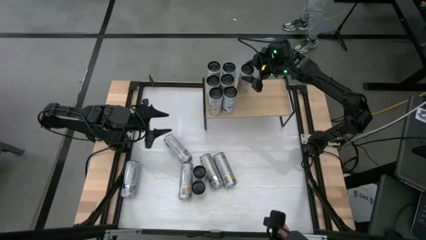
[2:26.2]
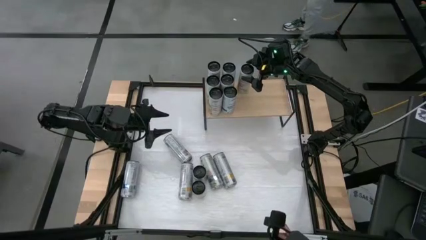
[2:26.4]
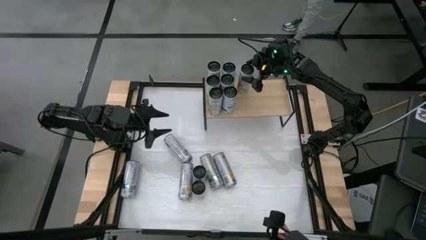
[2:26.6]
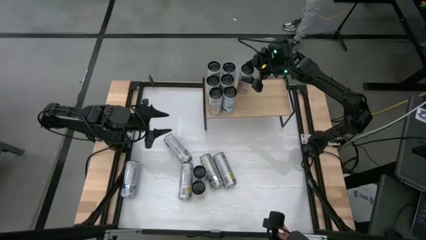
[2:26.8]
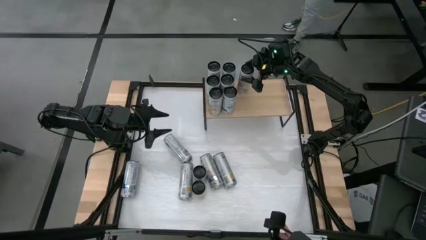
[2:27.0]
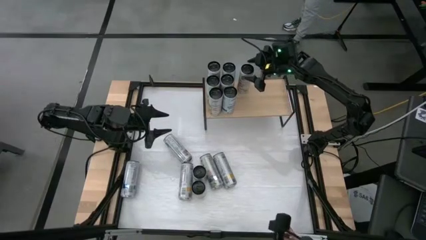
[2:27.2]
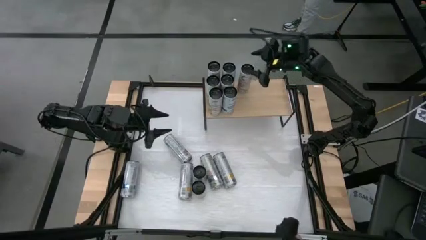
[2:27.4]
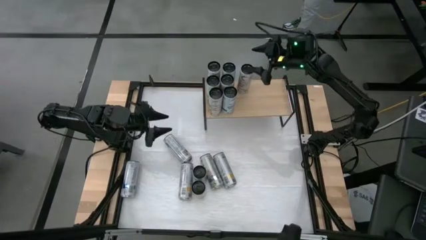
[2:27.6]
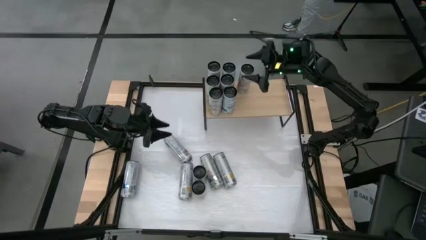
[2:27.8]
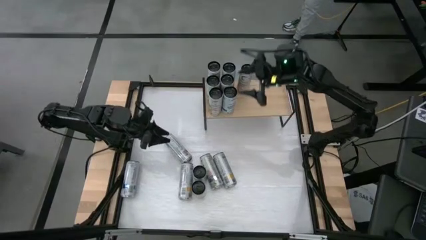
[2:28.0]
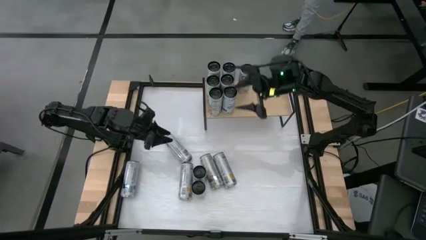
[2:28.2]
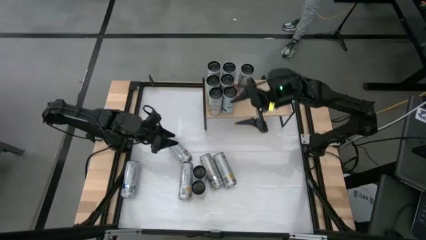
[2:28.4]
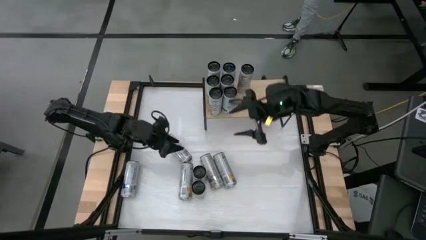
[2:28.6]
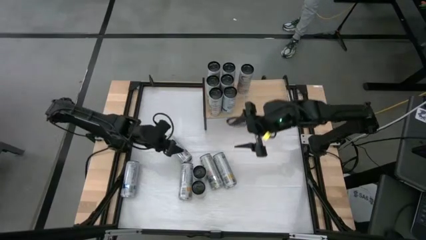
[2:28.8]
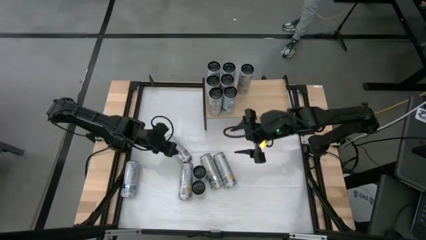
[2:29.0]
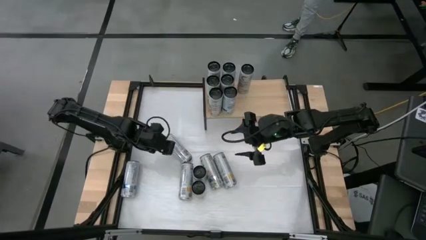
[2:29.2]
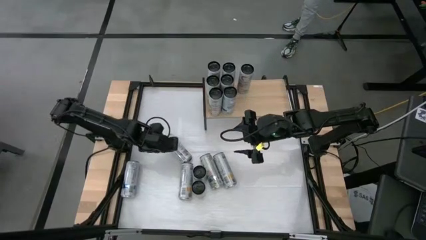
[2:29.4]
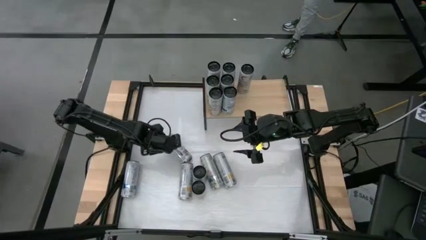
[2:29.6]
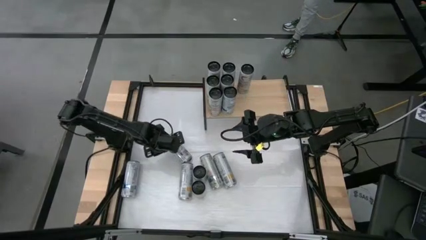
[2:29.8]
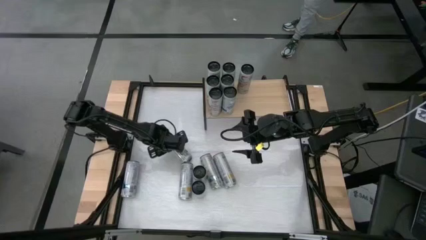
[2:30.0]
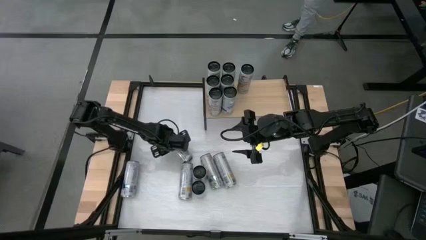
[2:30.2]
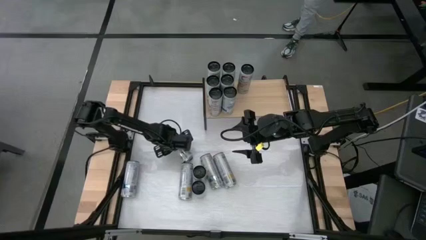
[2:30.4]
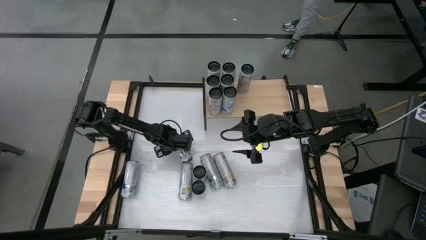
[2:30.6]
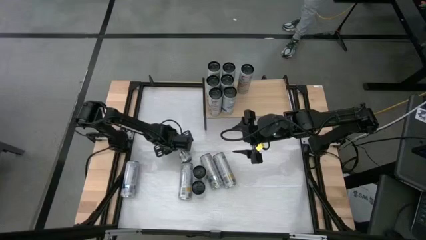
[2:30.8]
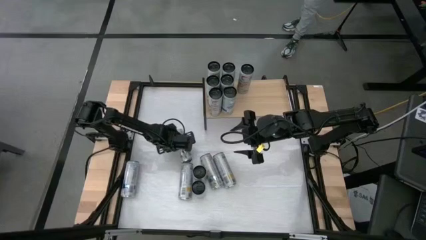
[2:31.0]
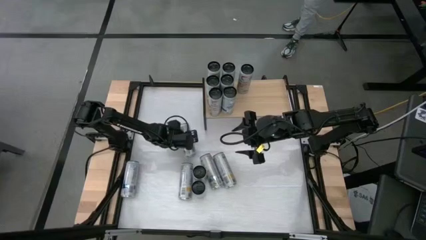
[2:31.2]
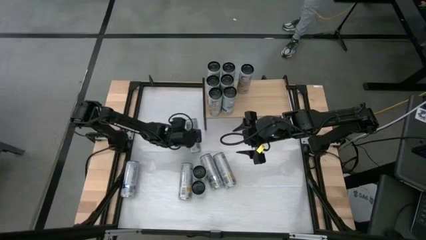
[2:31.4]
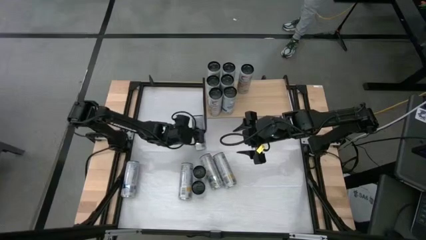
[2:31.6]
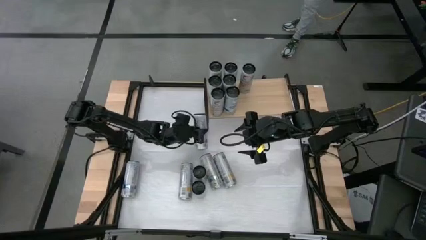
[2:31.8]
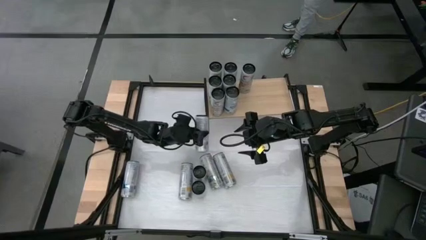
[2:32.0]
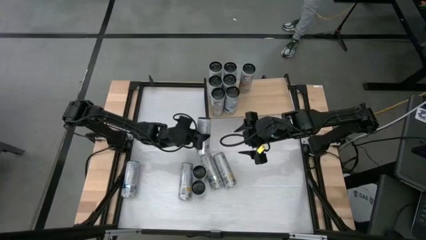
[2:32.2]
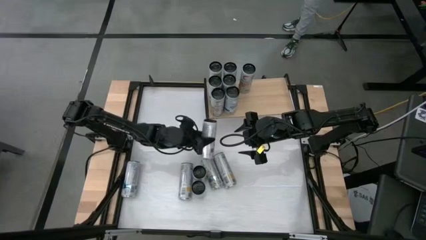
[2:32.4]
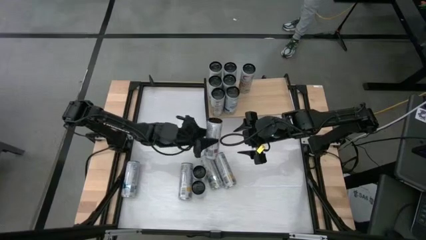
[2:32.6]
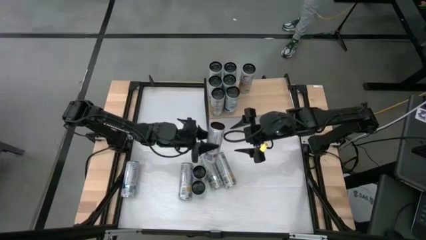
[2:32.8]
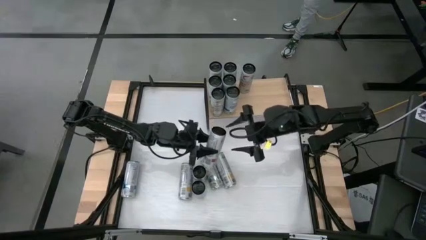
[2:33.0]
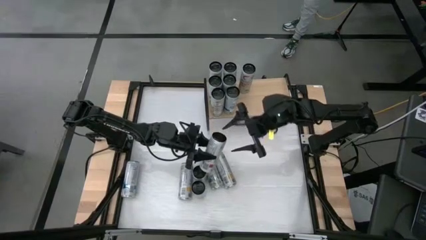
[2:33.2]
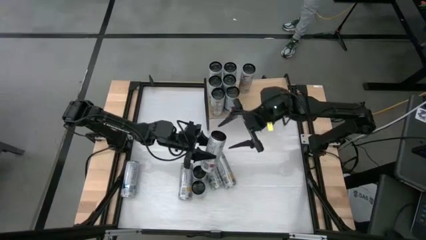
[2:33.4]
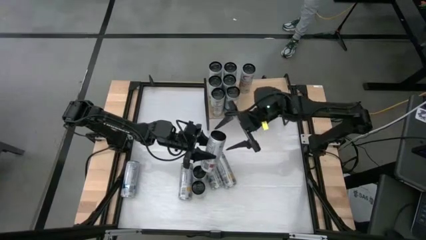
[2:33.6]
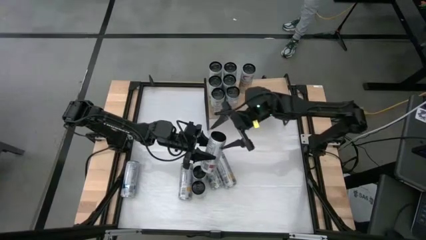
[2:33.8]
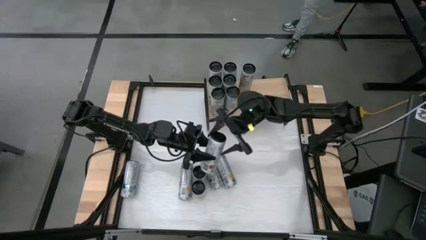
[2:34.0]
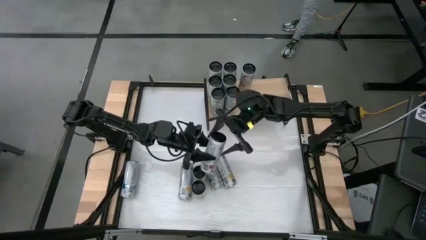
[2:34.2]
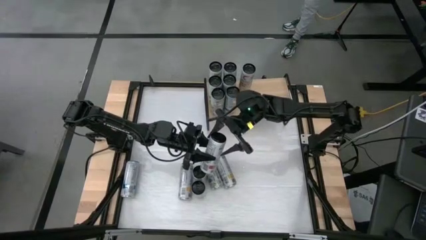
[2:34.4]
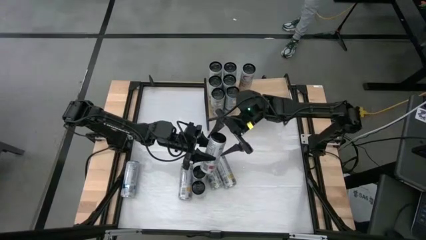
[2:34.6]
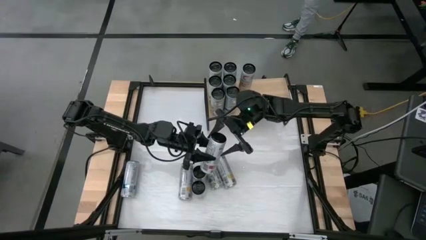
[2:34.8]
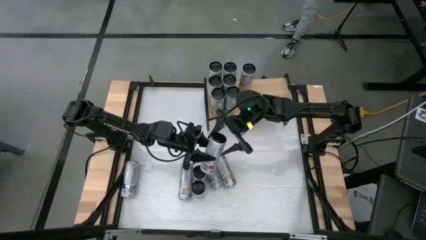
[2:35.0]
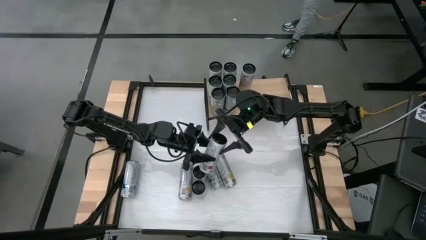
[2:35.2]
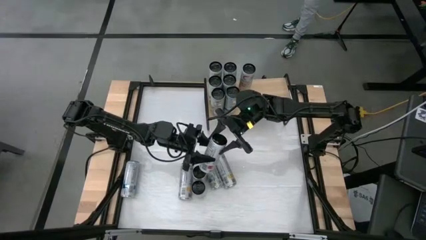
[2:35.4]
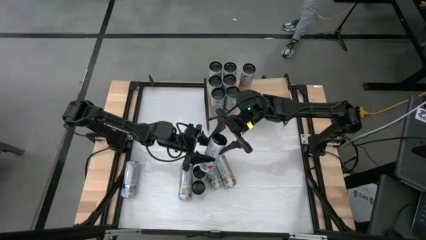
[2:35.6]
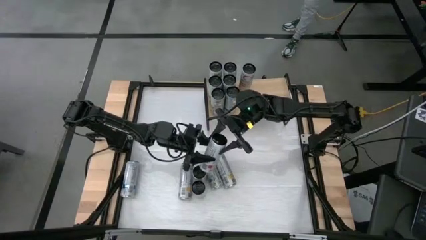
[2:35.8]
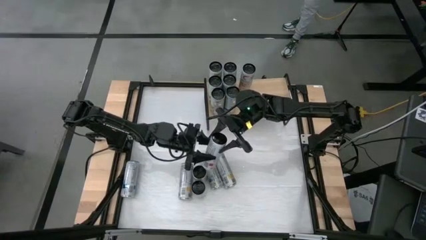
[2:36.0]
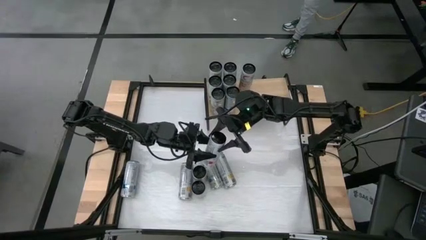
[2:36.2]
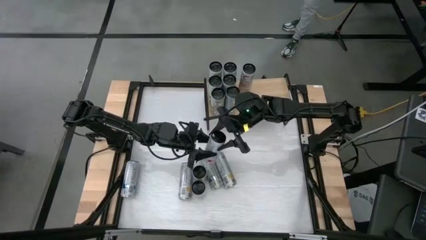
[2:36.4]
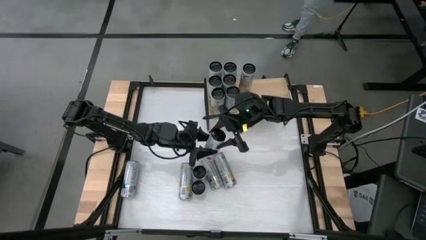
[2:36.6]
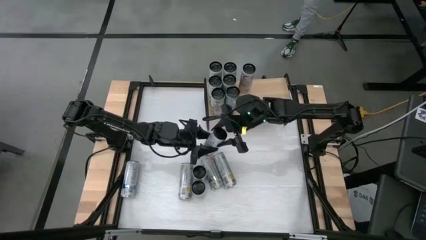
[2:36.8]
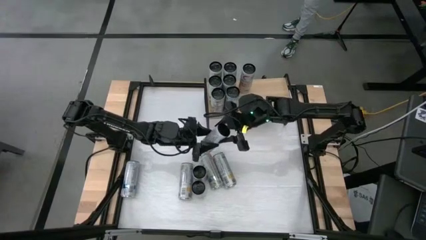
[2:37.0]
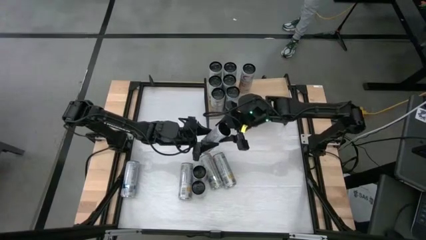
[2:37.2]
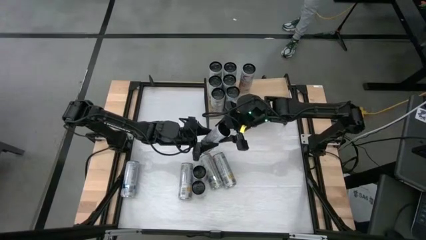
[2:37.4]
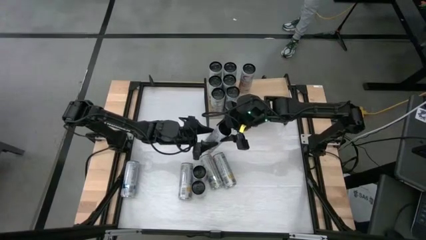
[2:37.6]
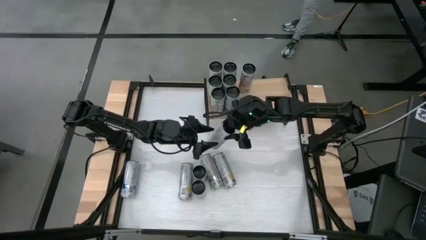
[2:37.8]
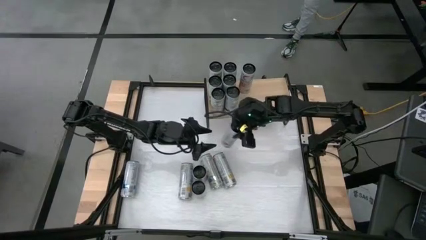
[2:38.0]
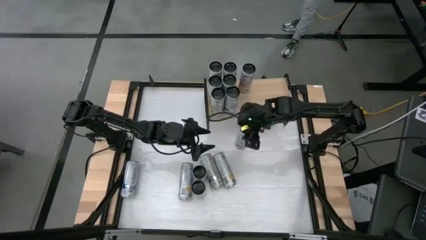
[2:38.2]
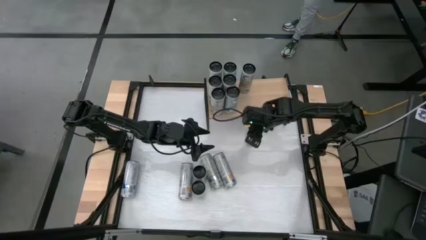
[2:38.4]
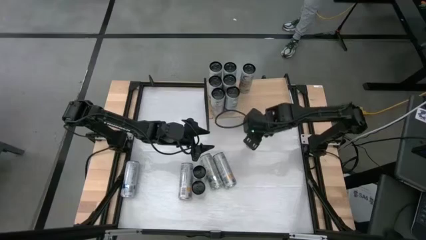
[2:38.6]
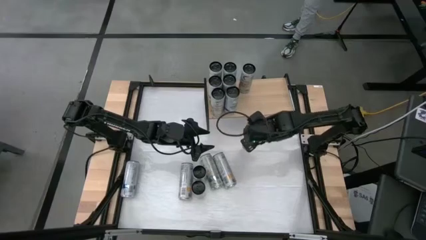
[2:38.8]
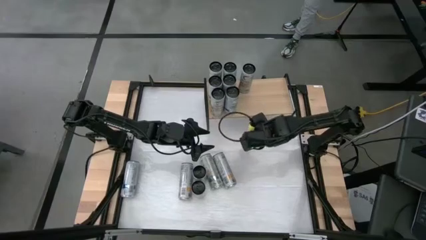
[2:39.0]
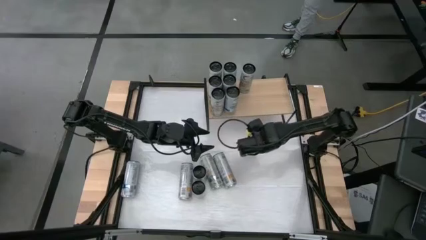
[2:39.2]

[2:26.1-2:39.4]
Task: Place canned beverage on shelf
Put the pink soda can on the shelf aligned with the other pink soda can

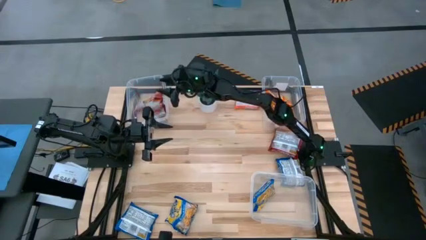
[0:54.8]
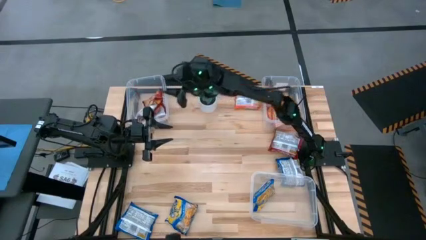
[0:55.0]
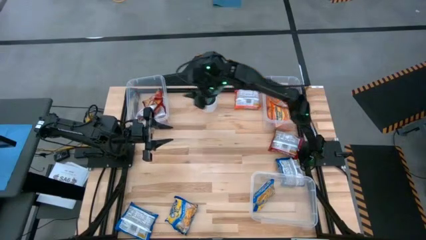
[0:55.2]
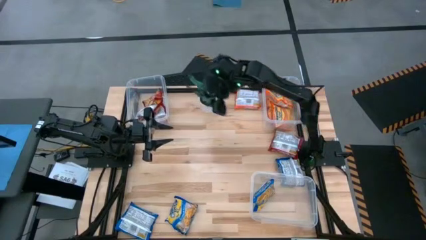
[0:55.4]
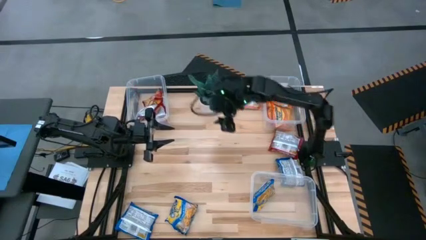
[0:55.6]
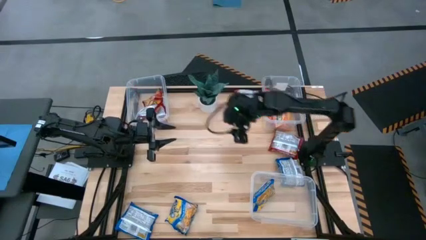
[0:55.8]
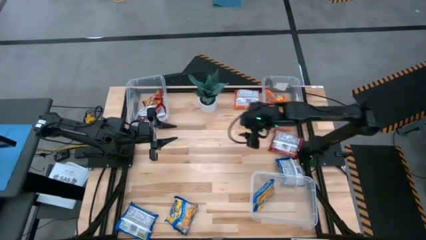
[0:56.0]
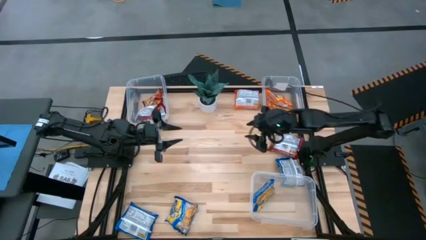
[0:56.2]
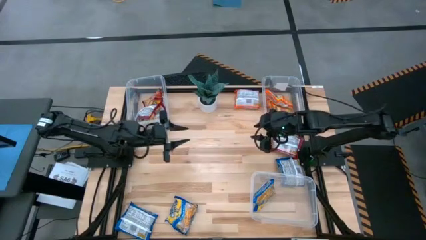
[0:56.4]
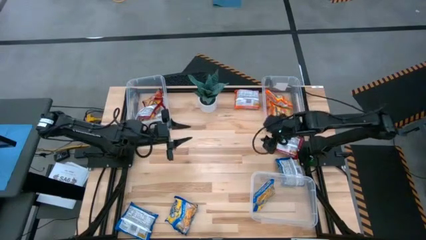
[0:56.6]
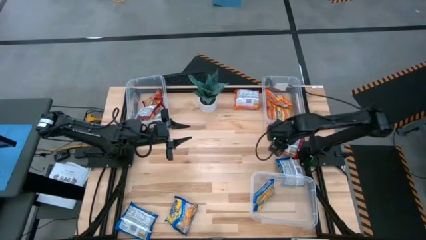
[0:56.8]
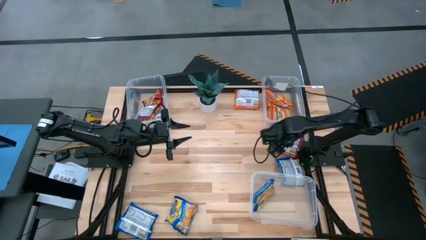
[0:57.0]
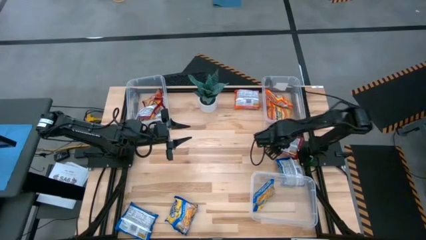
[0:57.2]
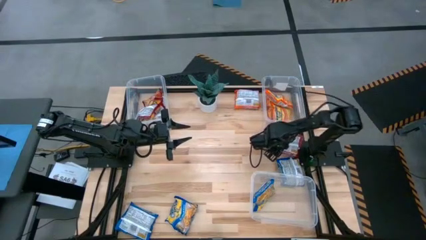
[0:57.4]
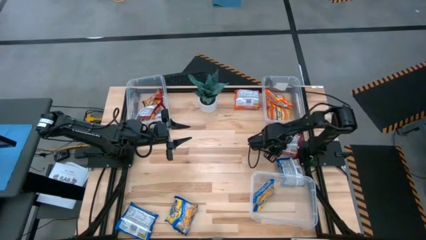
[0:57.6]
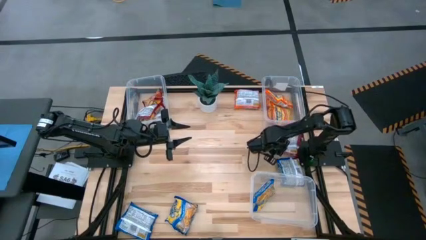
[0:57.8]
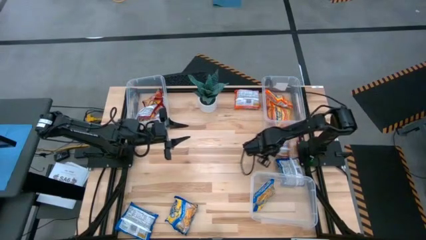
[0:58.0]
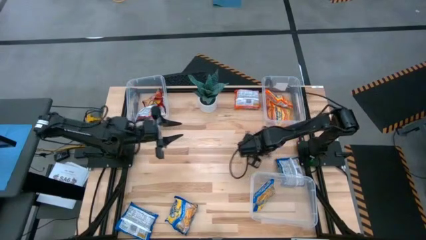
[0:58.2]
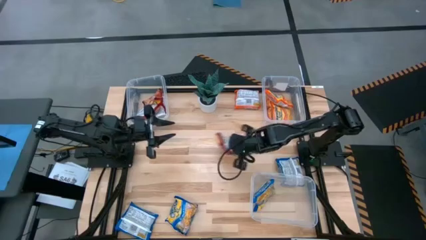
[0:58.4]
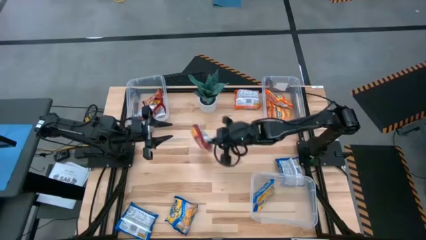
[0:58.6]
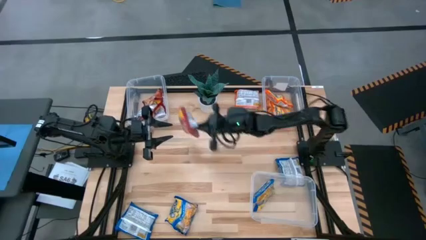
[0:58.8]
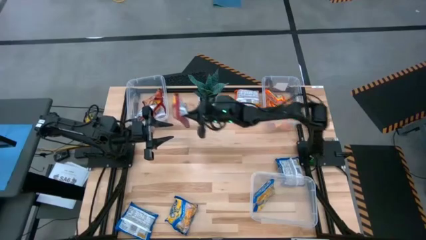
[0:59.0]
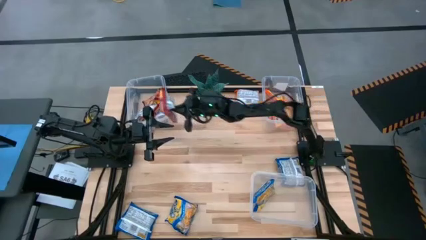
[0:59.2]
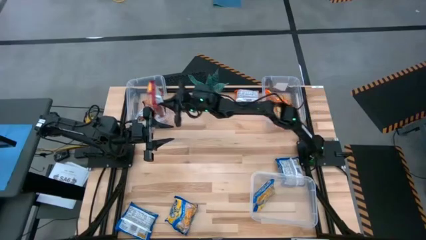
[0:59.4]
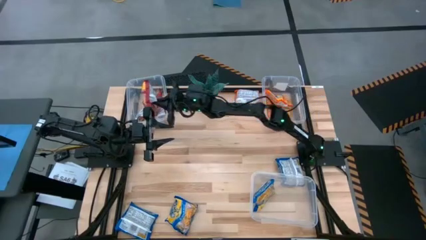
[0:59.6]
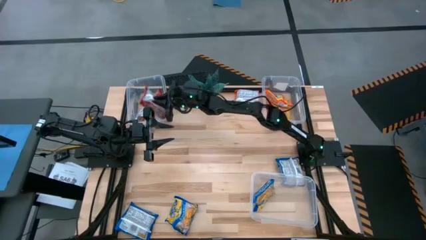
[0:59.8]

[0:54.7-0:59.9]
Task: Sort Maruchan noodles
Put the red noodle pack in the top left transparent bin
